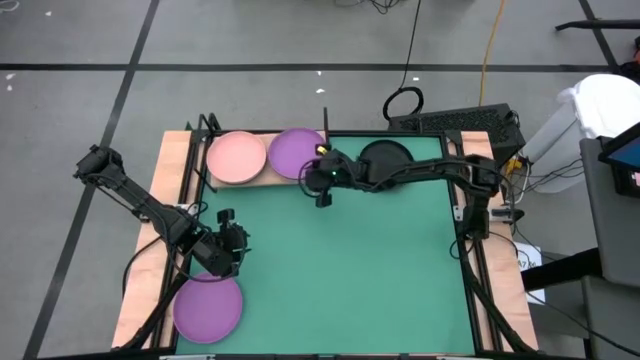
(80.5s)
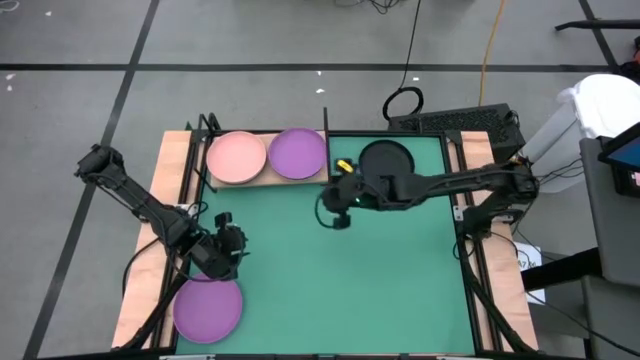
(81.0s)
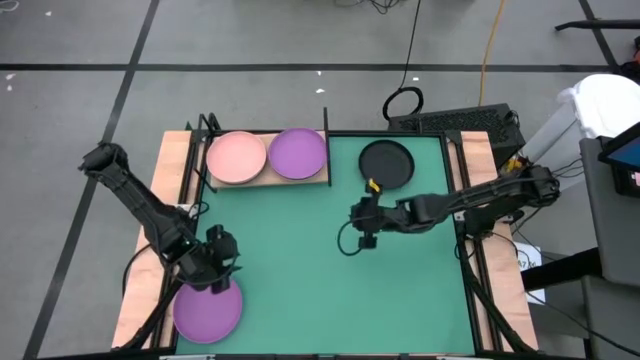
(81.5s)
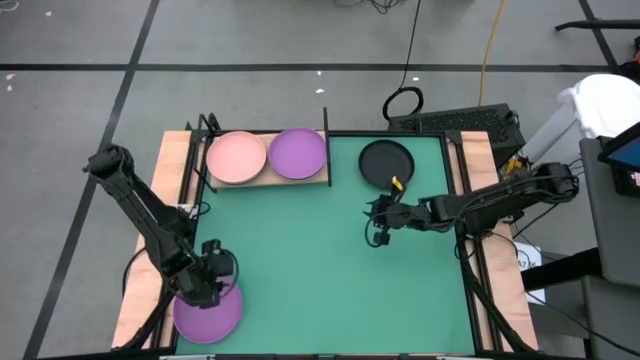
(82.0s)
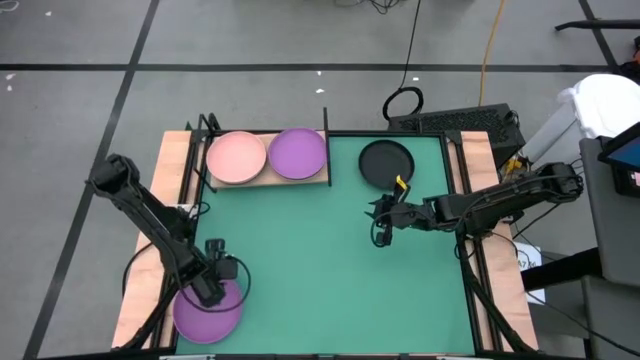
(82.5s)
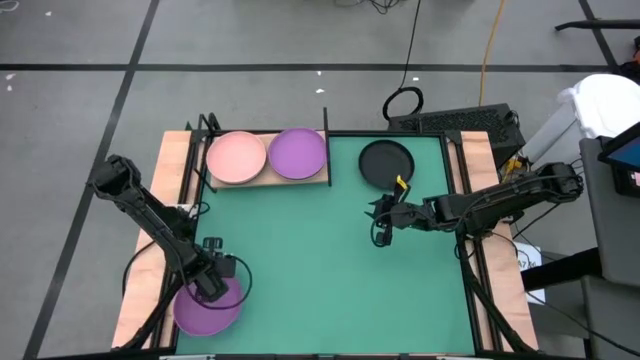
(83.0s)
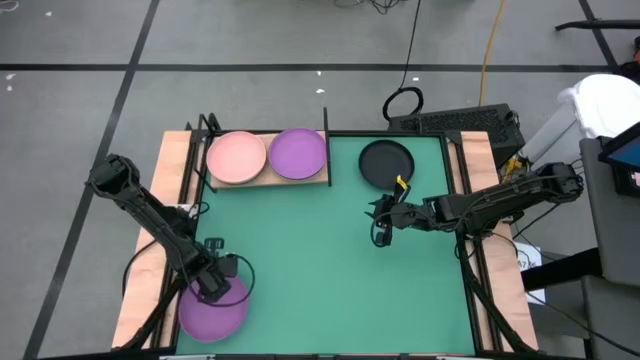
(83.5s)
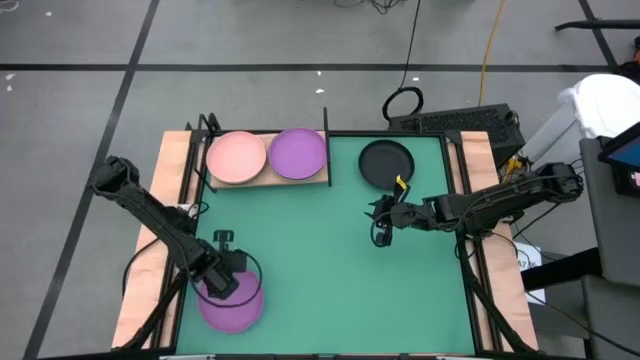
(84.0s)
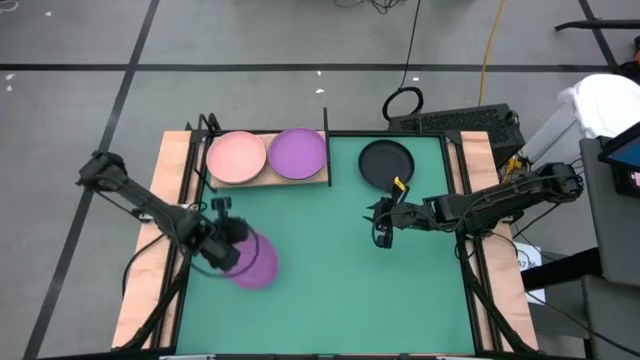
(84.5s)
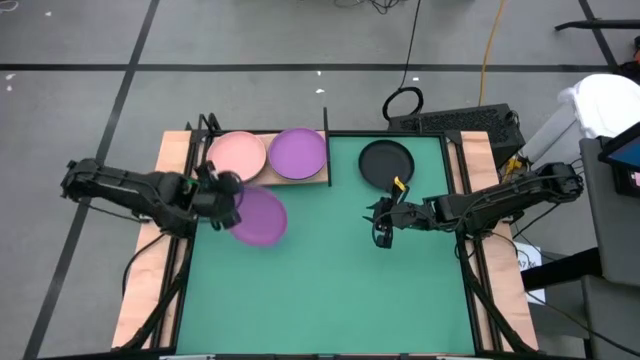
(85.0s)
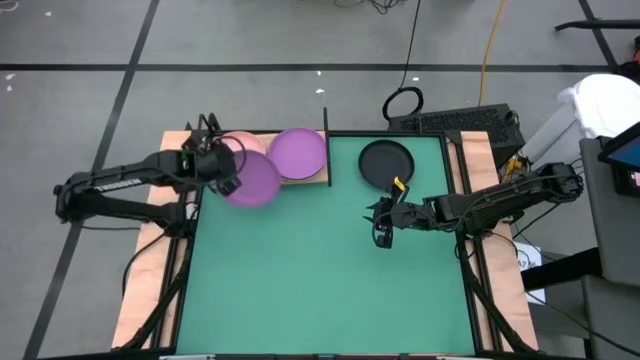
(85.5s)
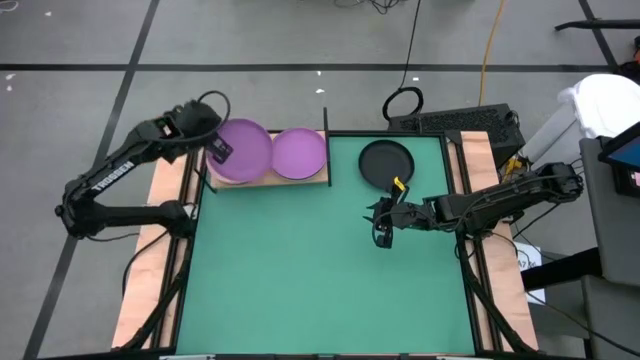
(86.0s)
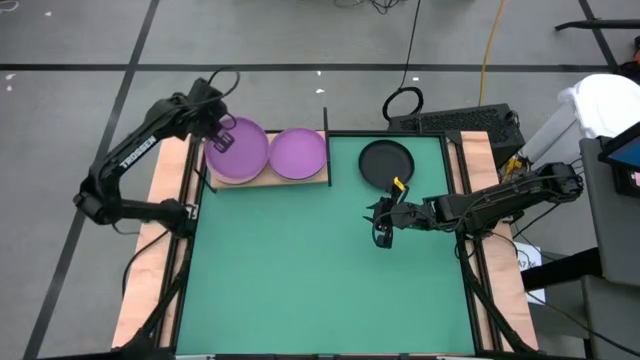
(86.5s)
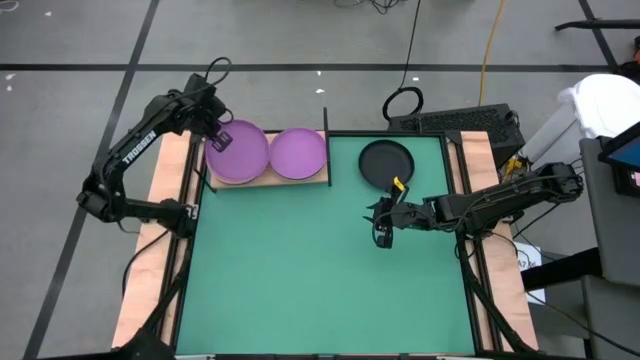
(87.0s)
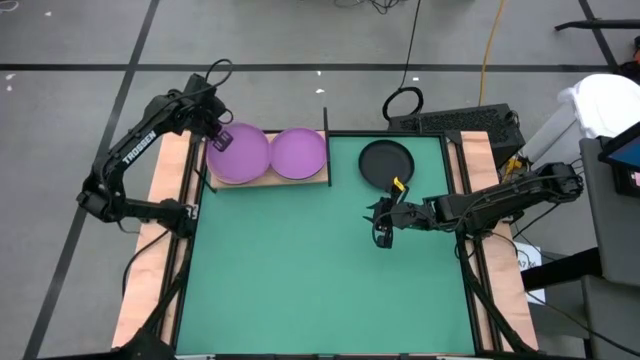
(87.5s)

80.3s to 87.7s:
Task: Place and stack plates onto a shelf
Stack the violet plate on top of the dark green plate on the shelf

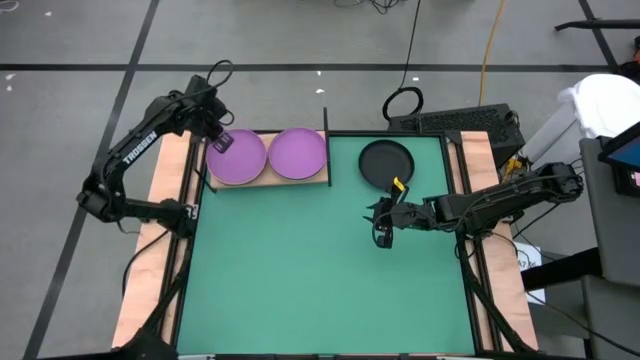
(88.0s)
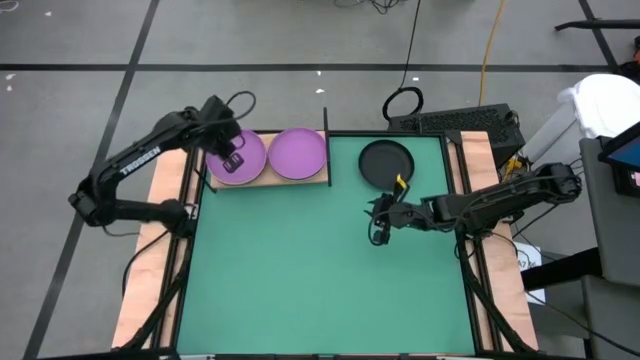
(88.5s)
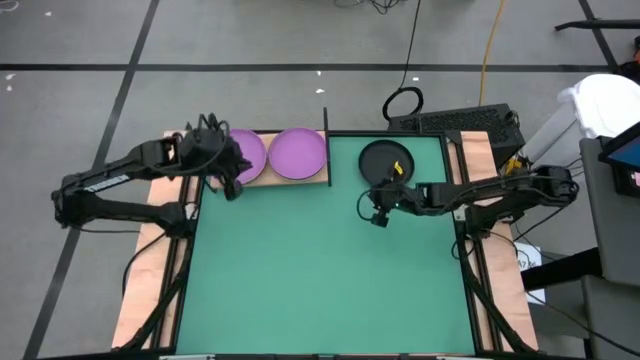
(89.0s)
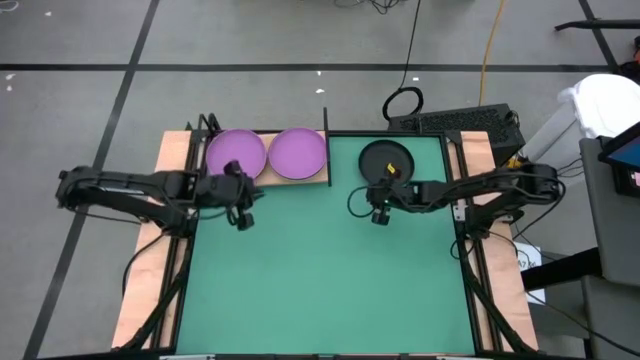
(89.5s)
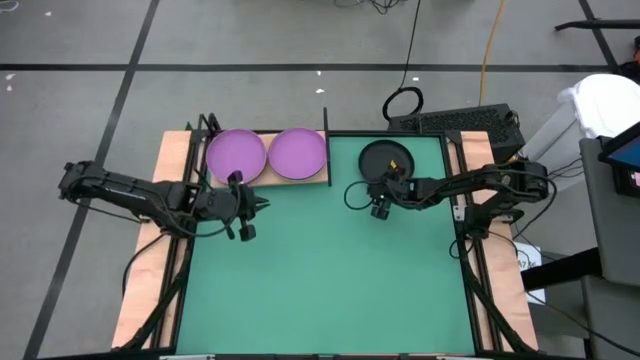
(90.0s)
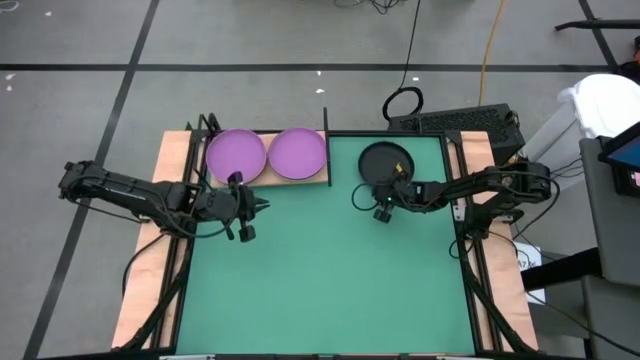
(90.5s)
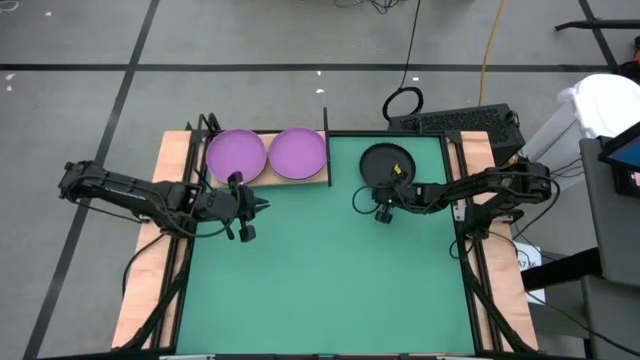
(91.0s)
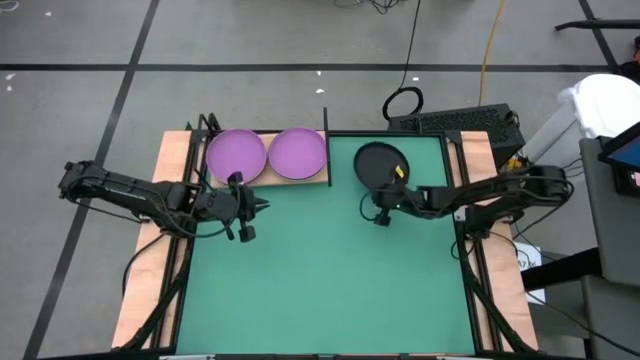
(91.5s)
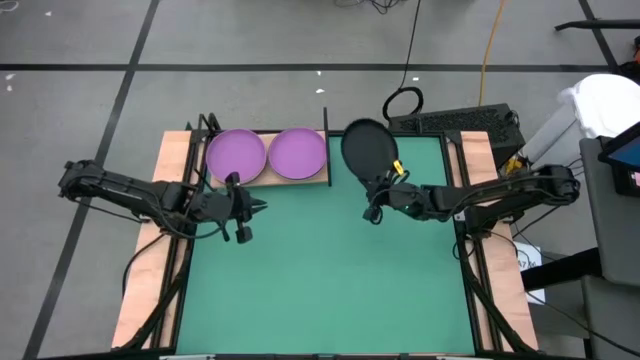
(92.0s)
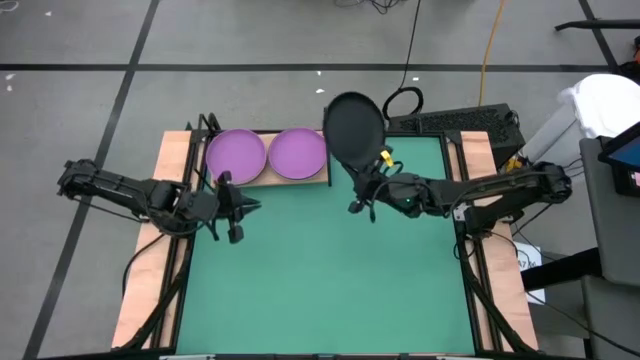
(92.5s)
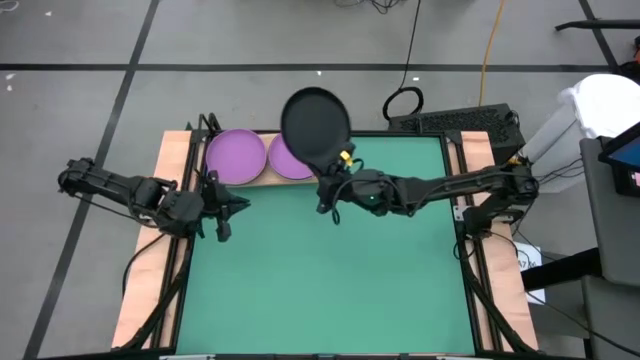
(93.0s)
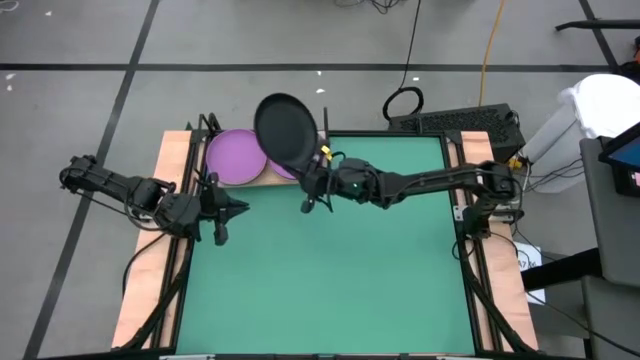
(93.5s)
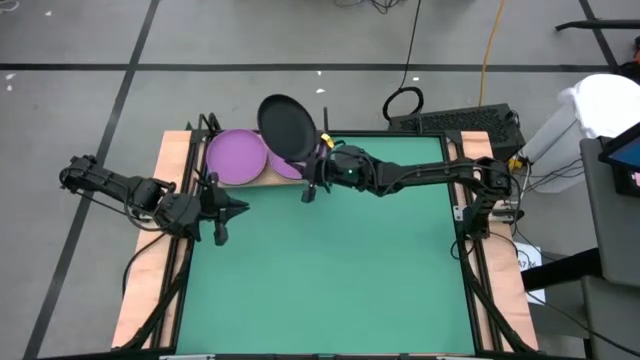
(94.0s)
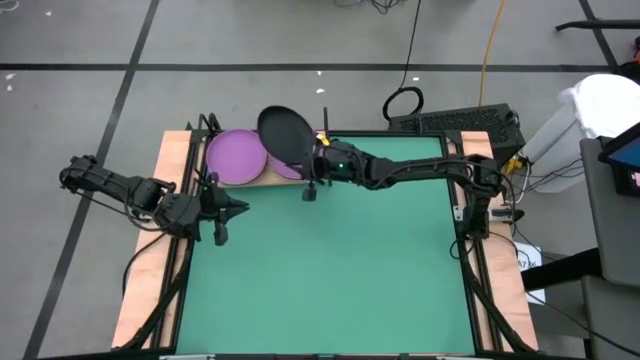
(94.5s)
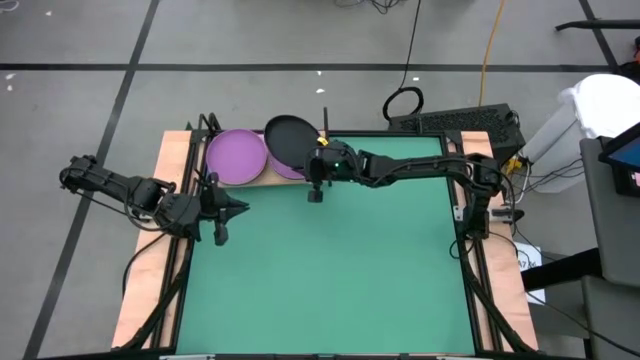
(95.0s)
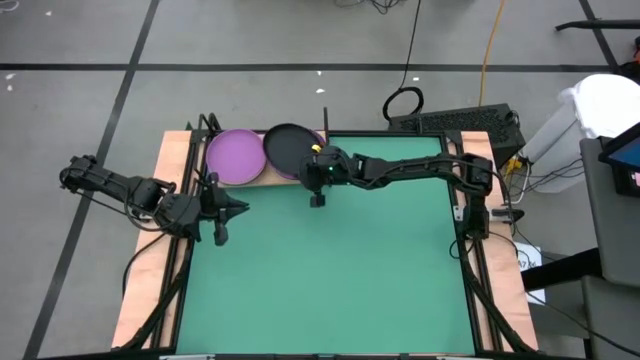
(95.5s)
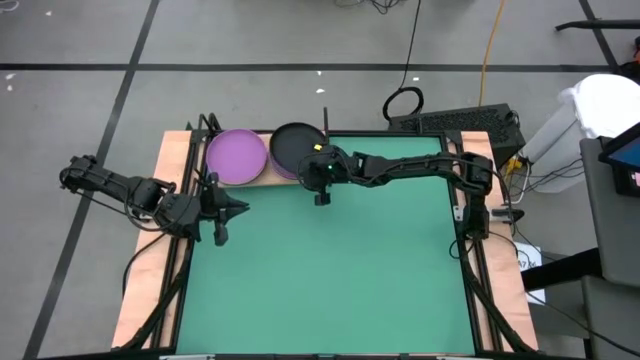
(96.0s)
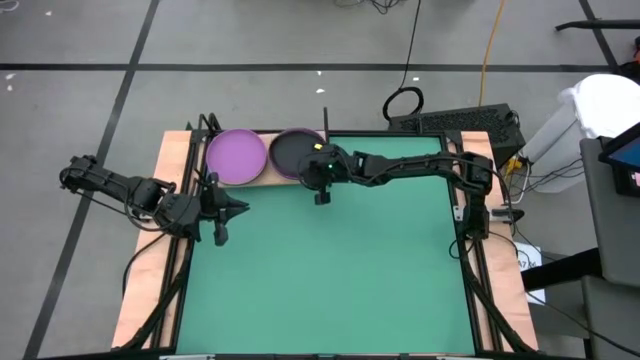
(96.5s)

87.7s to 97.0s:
Stack the black plate on top of the right violet plate on the shelf

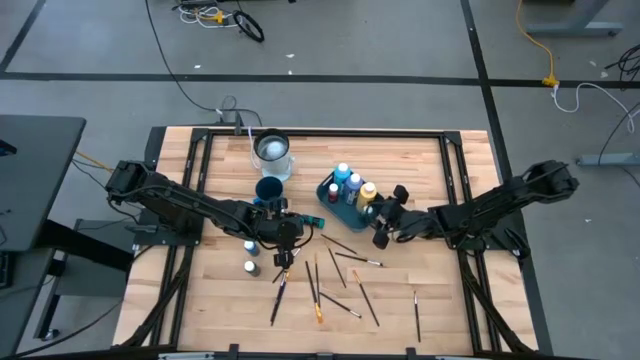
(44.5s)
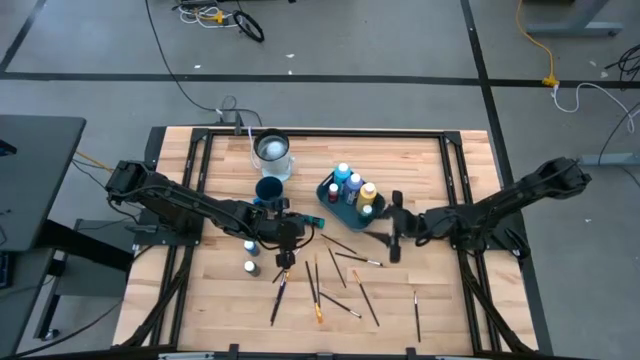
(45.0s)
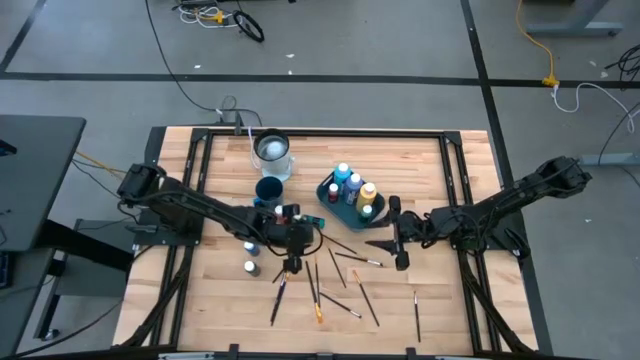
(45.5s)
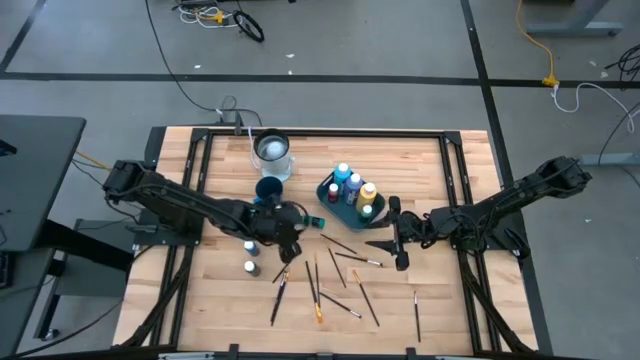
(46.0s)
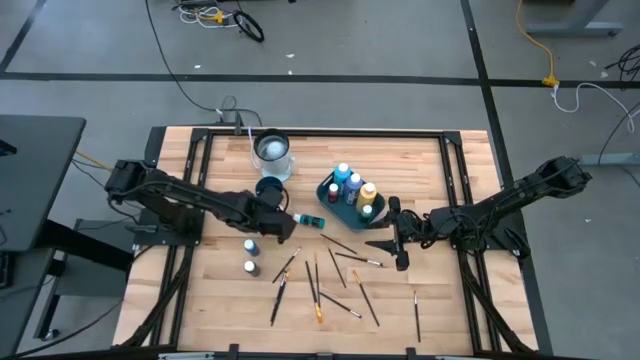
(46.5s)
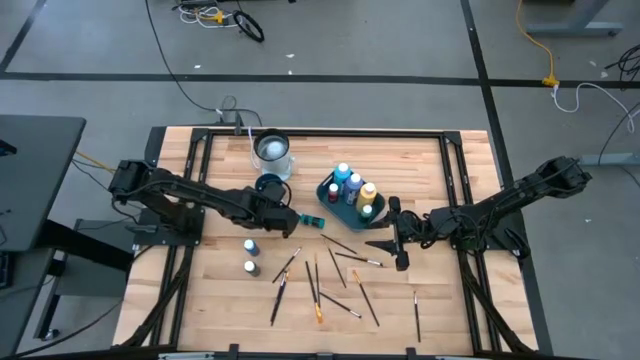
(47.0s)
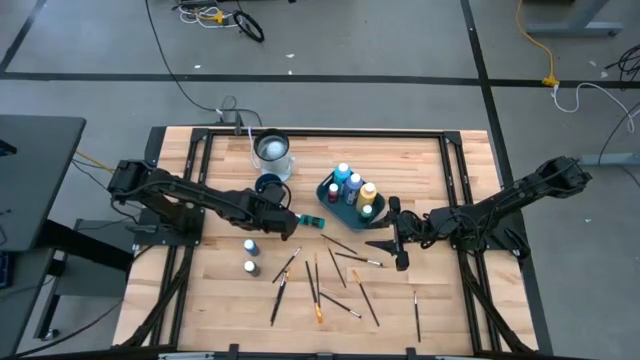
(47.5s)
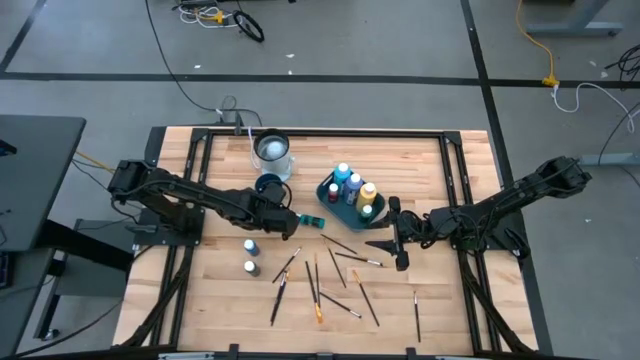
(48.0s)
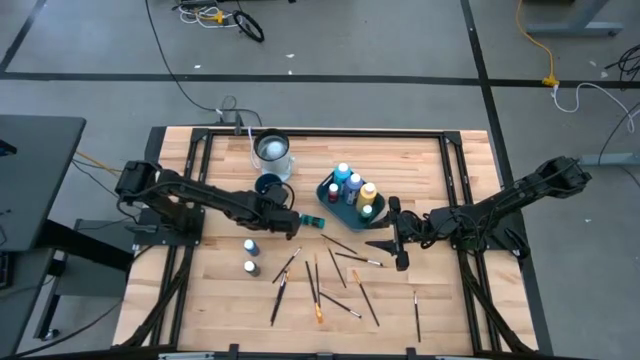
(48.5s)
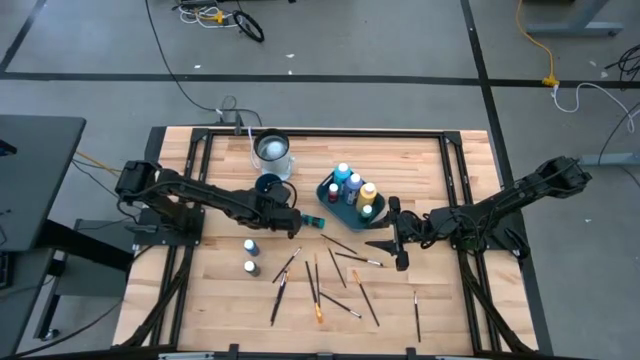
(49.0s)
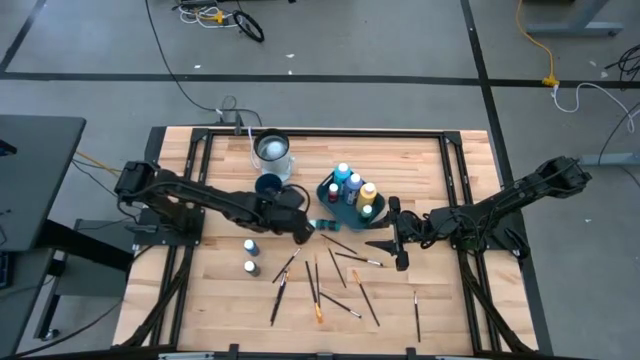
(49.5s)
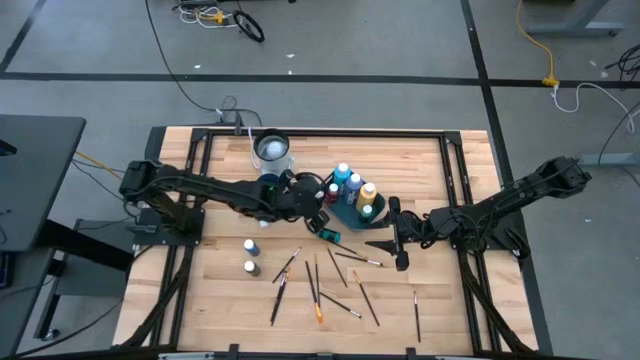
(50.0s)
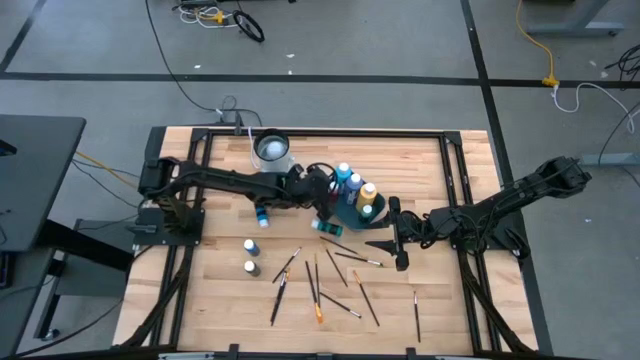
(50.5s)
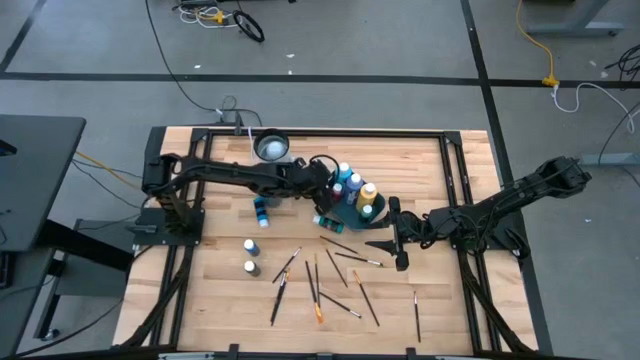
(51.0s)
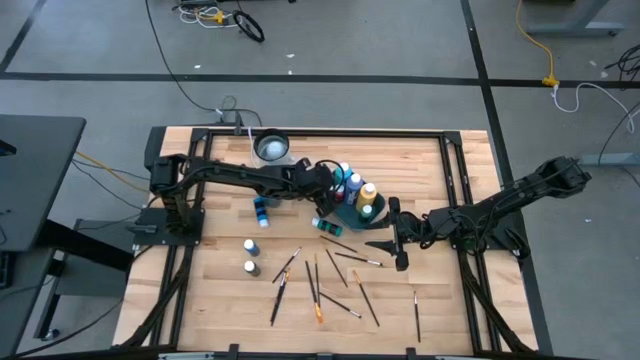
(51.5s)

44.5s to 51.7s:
Task: Pick & Place Paint Supplies
Put the orange paint bottle into the blue bin
